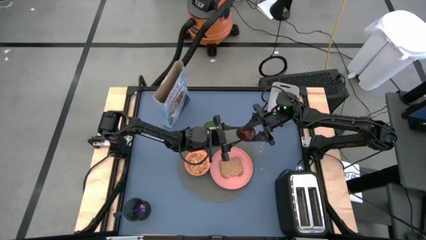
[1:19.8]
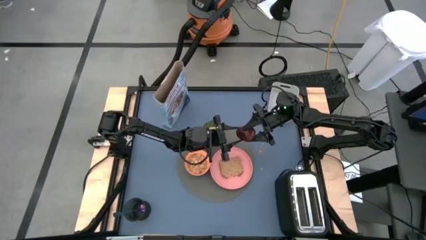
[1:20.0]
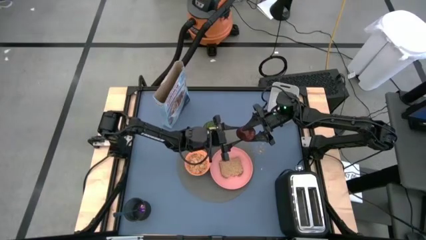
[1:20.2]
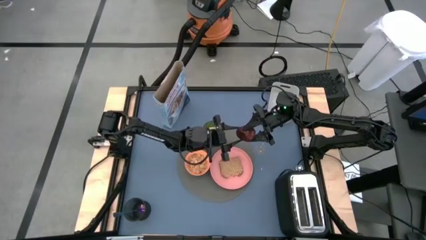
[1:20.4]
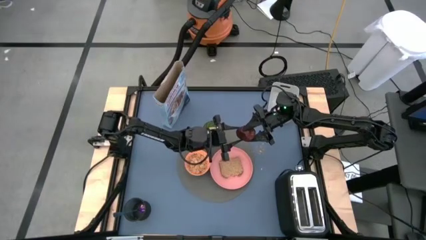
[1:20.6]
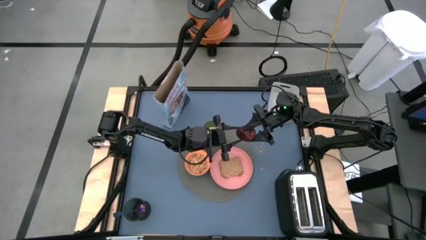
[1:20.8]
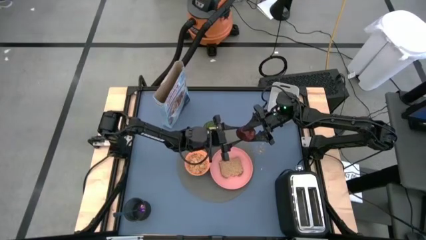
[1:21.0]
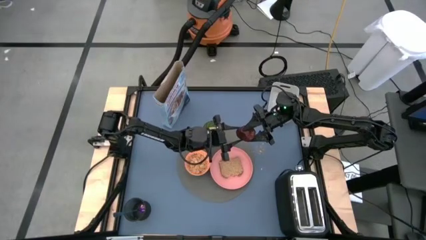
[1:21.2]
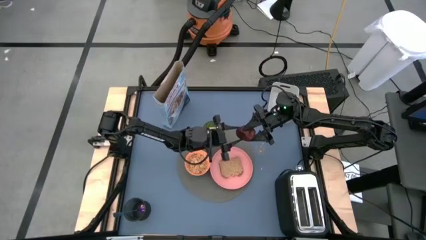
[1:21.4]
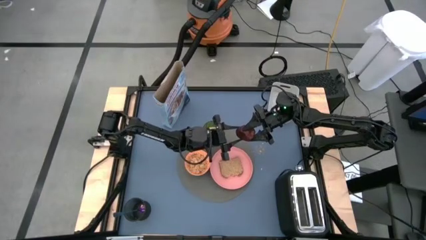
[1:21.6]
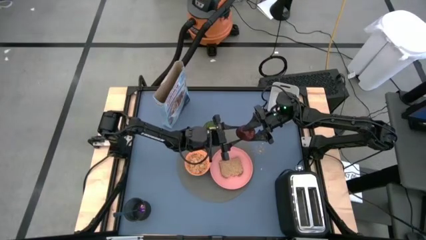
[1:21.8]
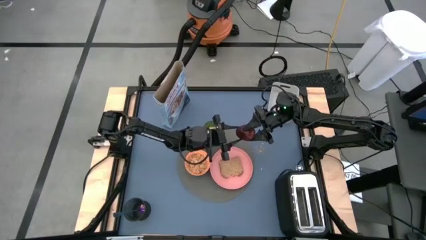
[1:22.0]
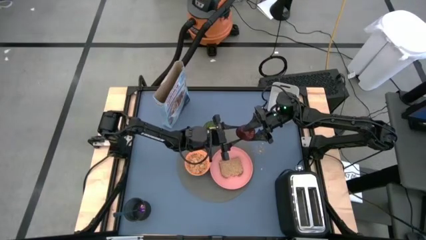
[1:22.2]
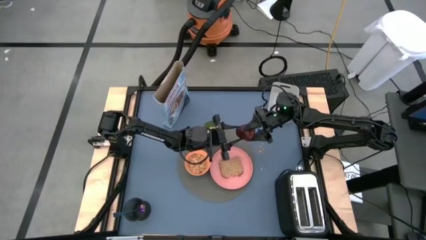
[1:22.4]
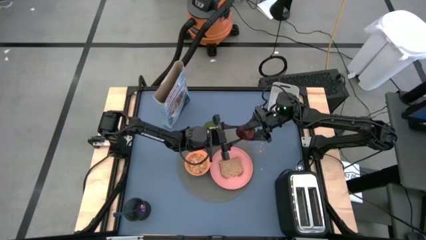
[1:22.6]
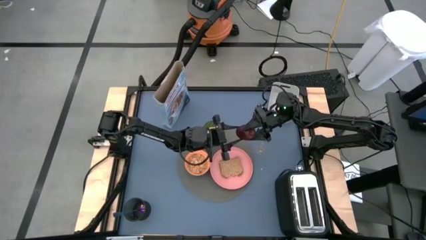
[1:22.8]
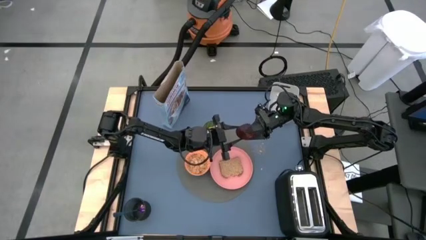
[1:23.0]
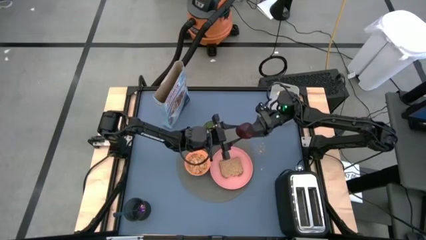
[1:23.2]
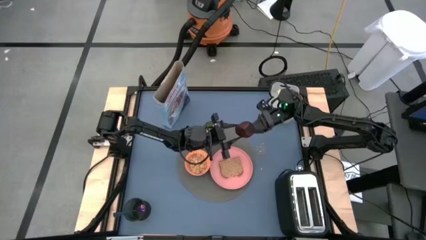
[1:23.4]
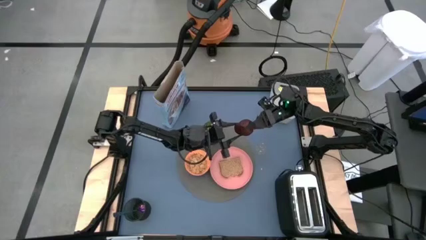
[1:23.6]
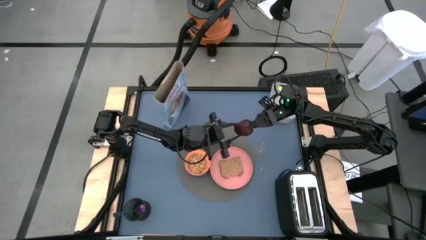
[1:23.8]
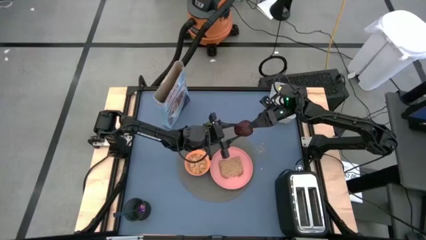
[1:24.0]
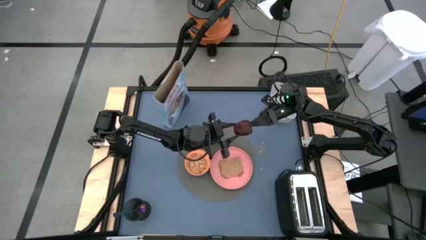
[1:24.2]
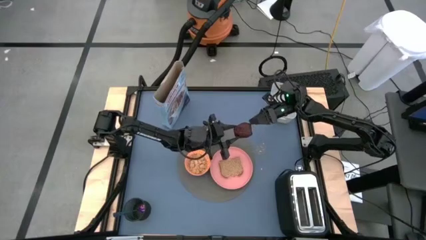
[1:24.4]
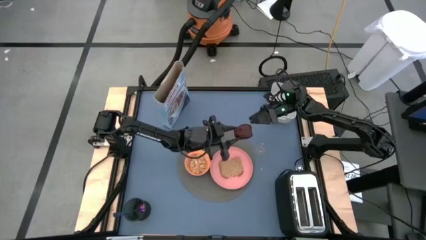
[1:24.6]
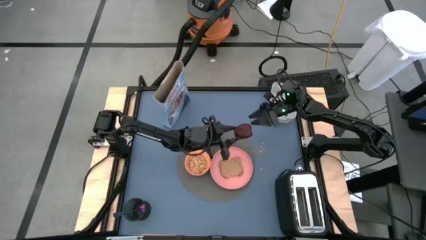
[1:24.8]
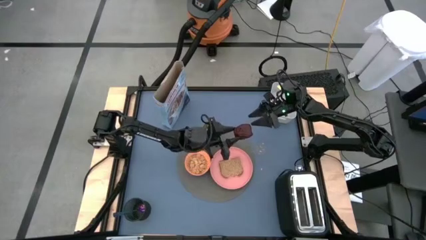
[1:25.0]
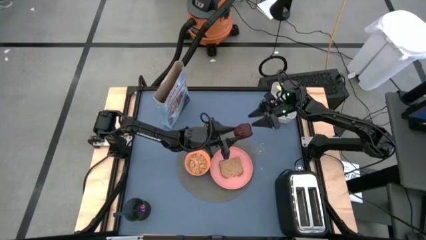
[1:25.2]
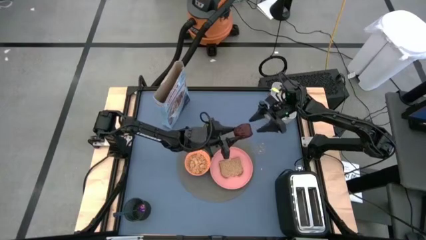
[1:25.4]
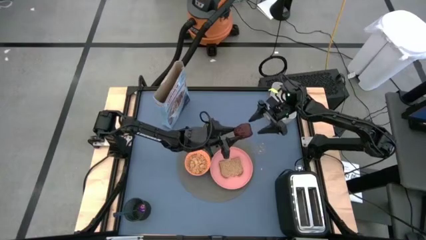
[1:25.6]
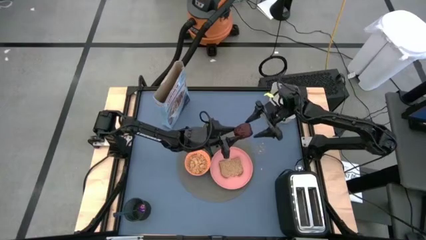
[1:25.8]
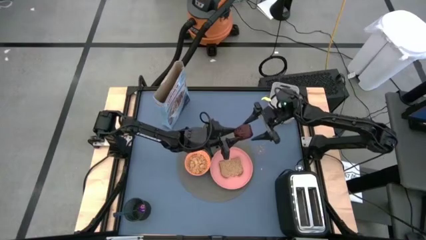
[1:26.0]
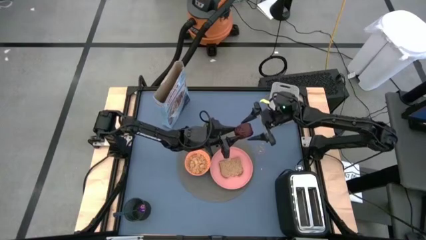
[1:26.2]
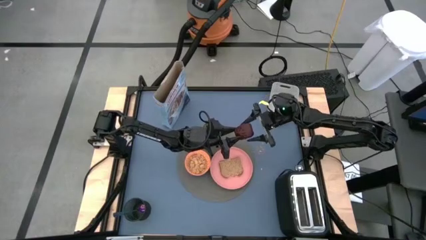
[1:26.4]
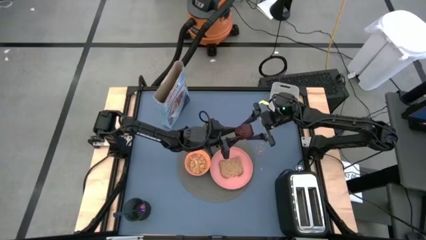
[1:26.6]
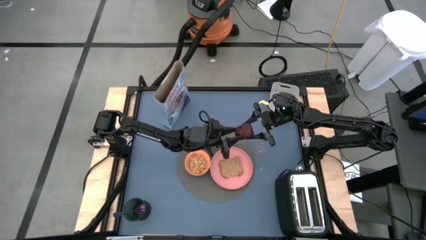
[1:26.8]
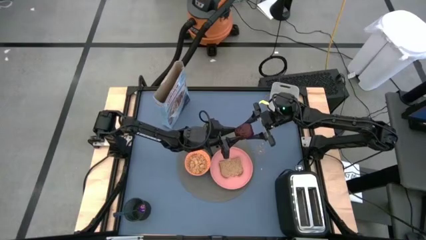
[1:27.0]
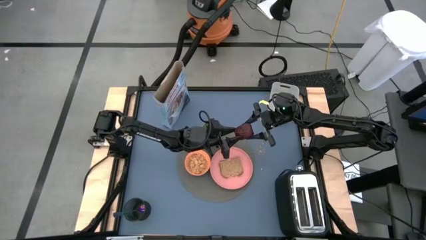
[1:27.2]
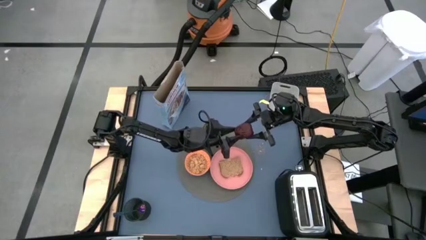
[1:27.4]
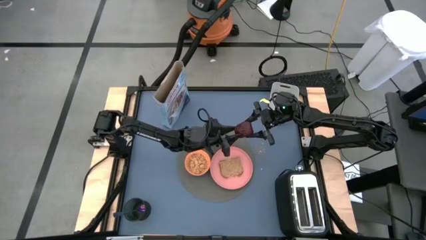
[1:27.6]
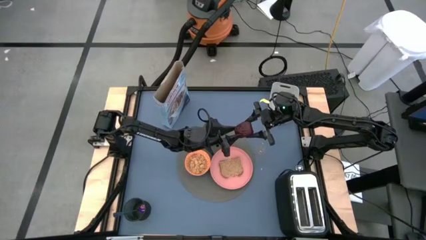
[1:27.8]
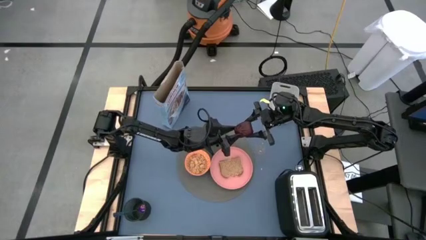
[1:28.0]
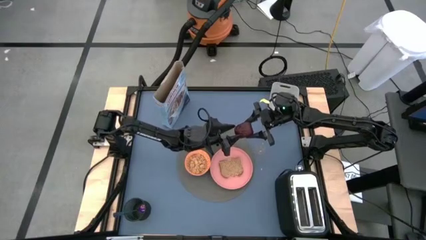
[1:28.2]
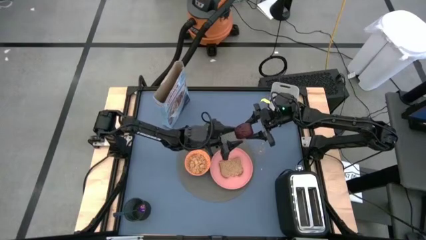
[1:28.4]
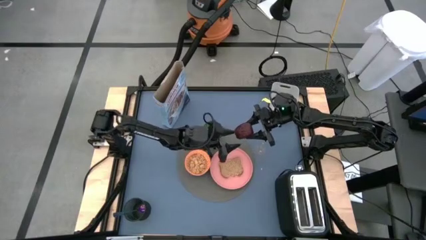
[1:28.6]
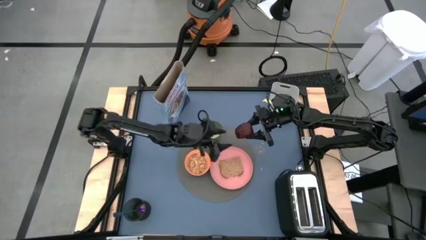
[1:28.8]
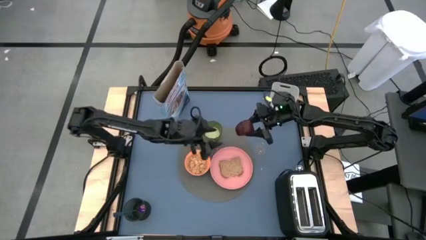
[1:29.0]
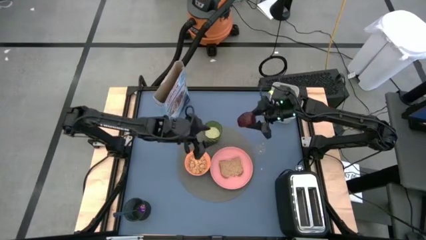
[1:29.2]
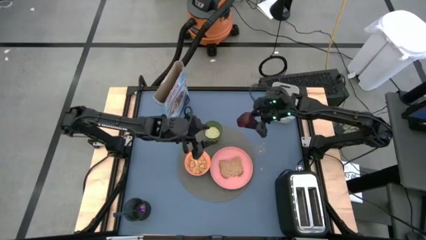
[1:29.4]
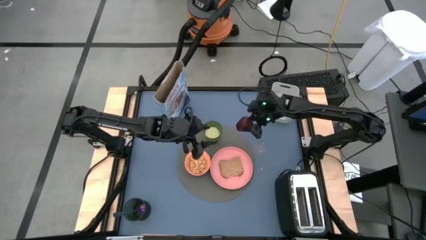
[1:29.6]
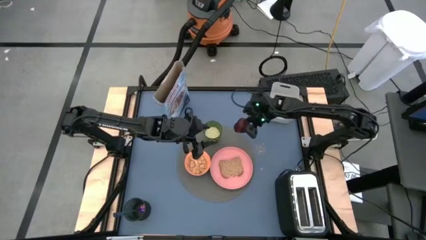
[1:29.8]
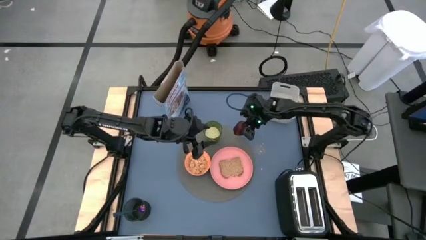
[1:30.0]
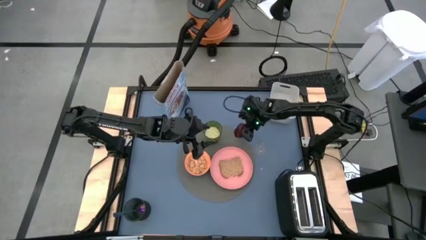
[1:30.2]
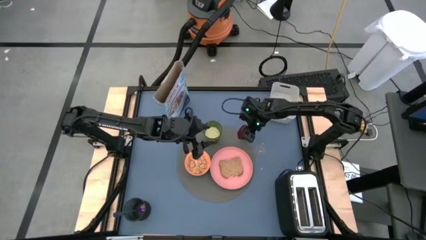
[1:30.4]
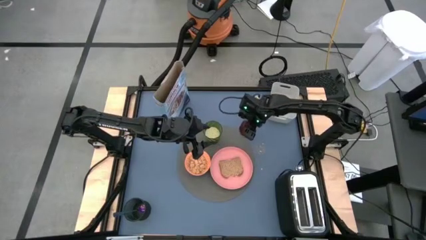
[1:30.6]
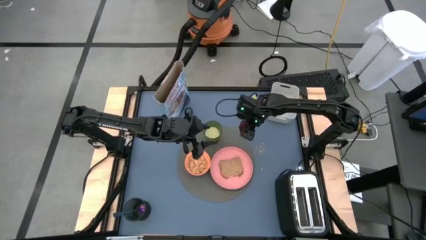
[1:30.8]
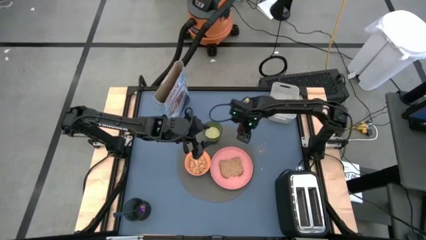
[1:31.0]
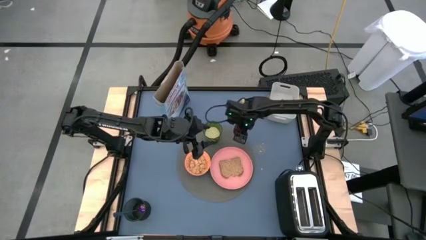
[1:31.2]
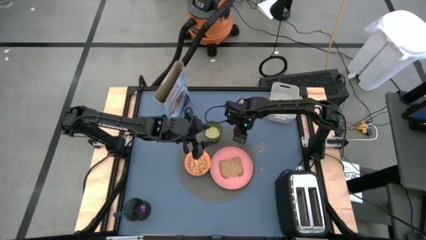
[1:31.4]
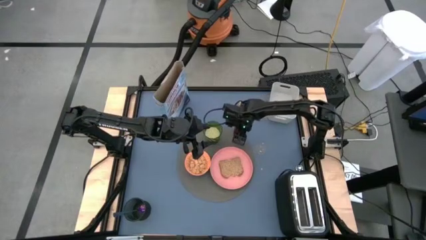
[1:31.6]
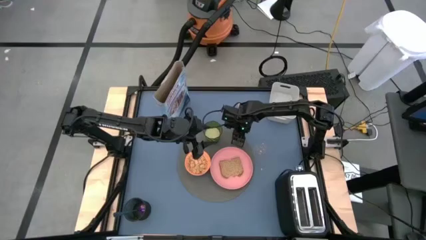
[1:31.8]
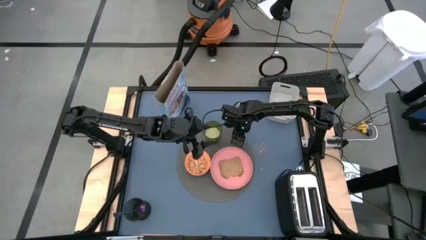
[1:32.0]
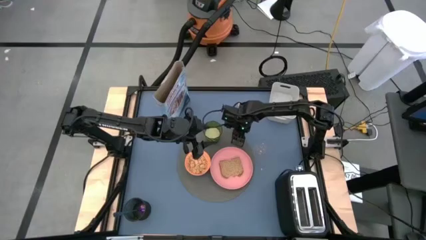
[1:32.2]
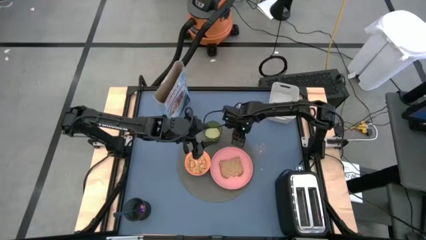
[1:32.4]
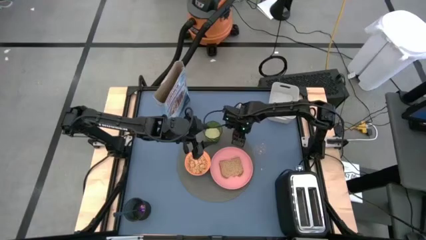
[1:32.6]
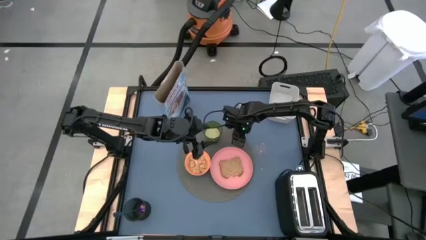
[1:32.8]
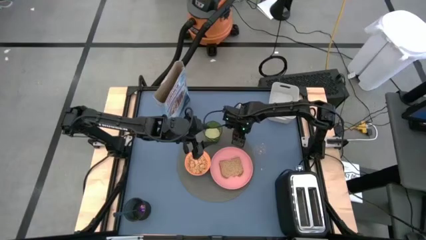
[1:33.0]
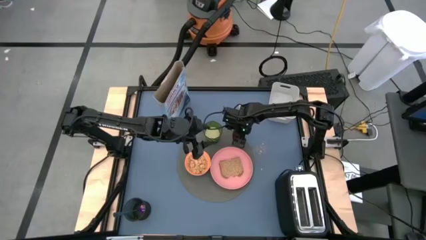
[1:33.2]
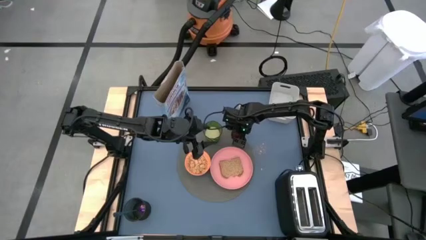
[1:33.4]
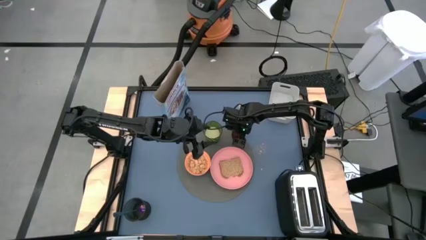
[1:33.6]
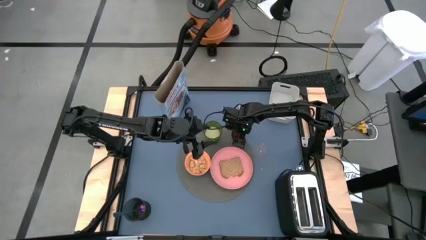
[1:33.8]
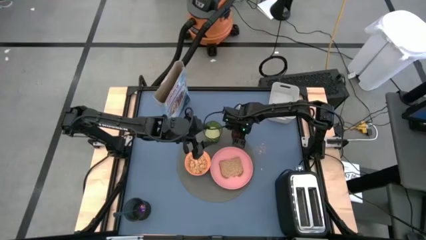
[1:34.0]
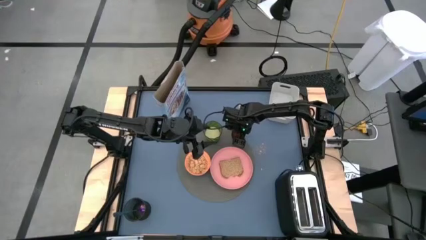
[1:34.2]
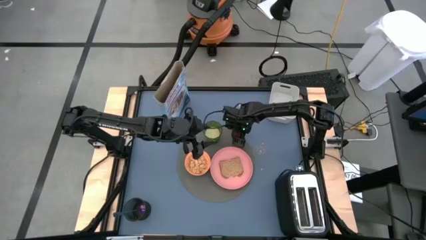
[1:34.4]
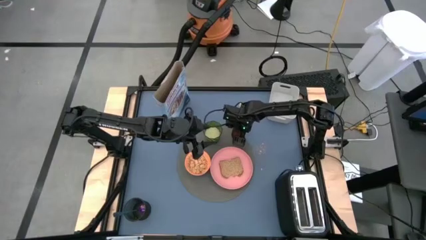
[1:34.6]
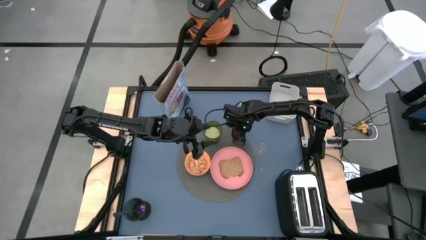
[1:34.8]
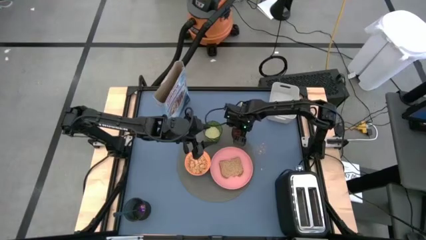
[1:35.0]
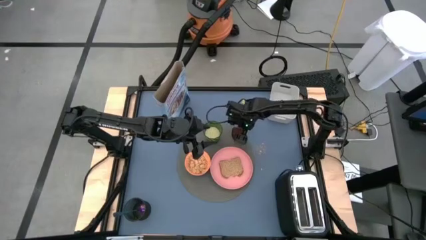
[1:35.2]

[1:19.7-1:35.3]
Task: Arrange a breakfast setting
Put the apple on the gray table mat to the right side of the green cup
